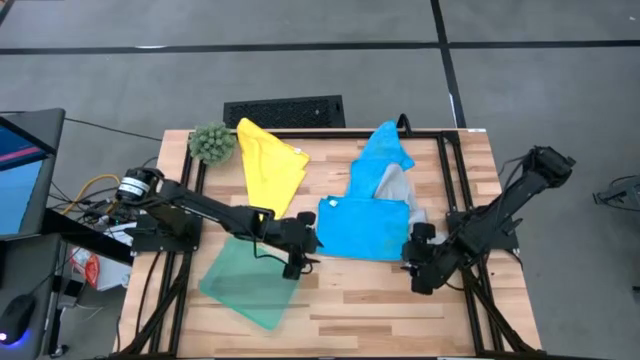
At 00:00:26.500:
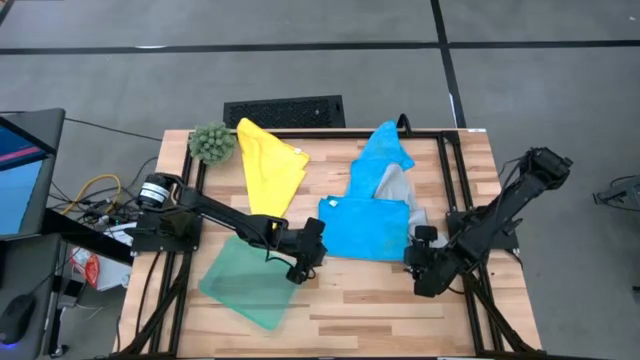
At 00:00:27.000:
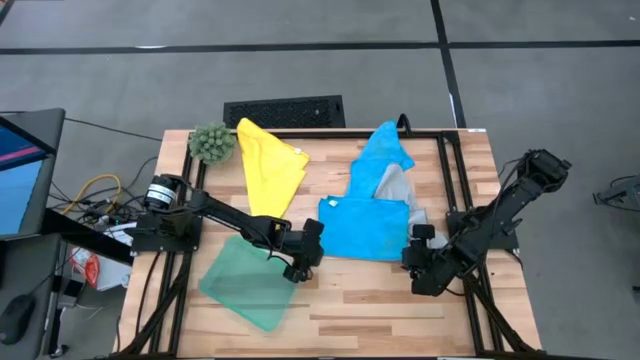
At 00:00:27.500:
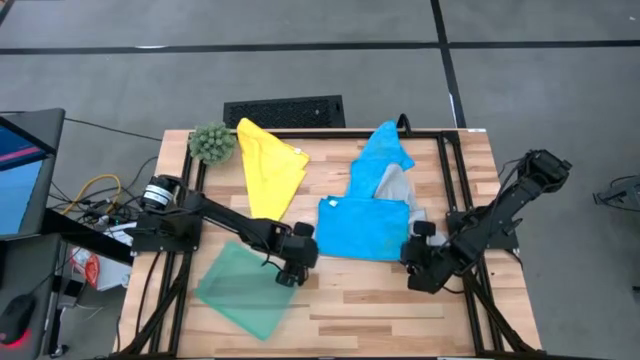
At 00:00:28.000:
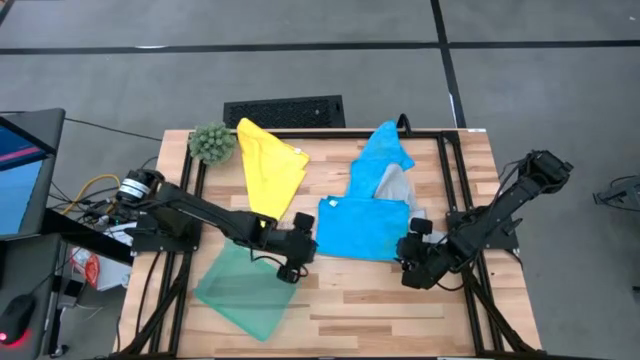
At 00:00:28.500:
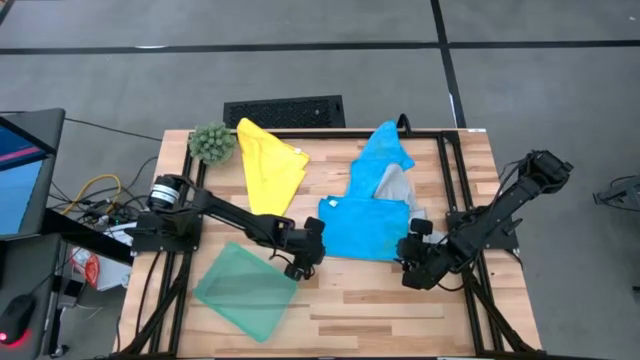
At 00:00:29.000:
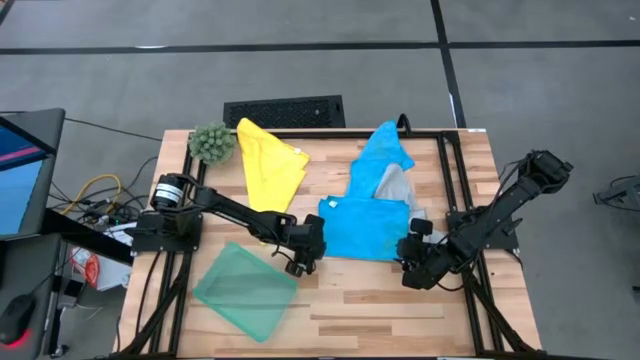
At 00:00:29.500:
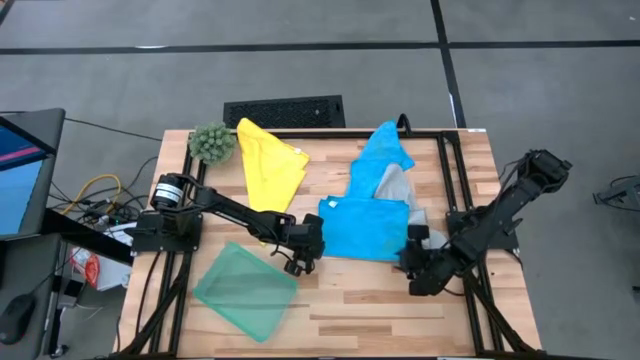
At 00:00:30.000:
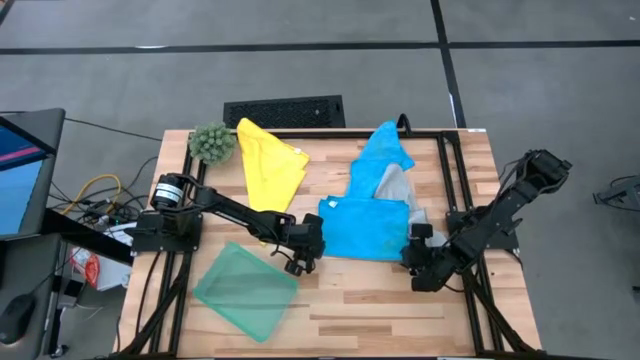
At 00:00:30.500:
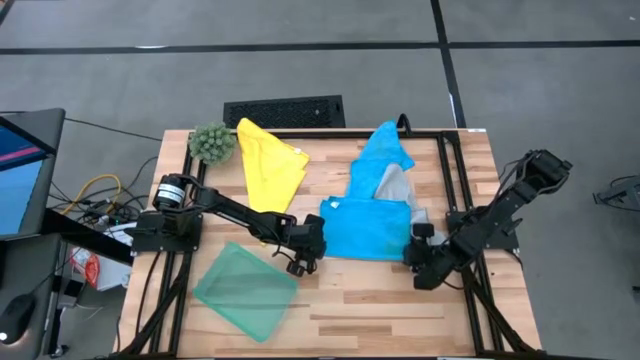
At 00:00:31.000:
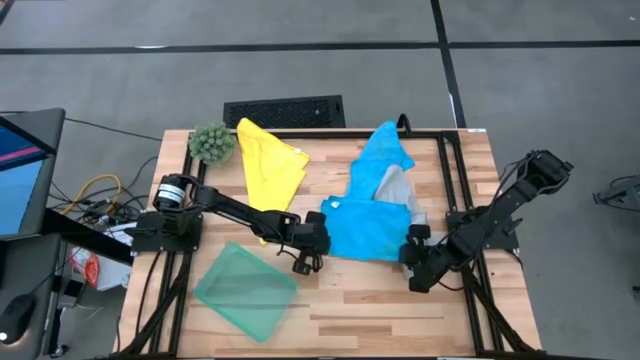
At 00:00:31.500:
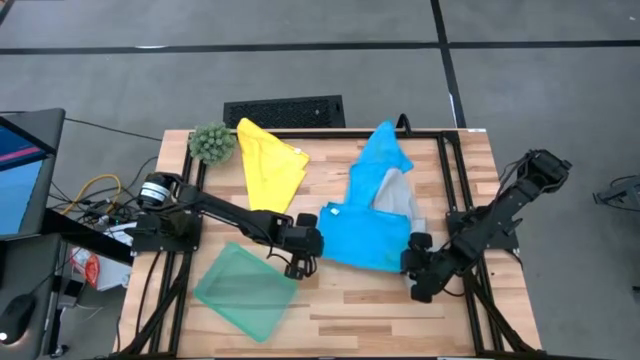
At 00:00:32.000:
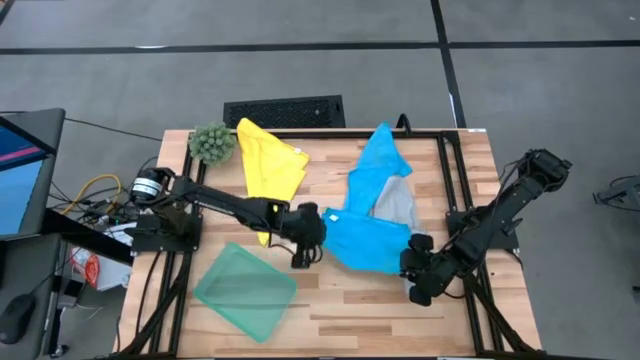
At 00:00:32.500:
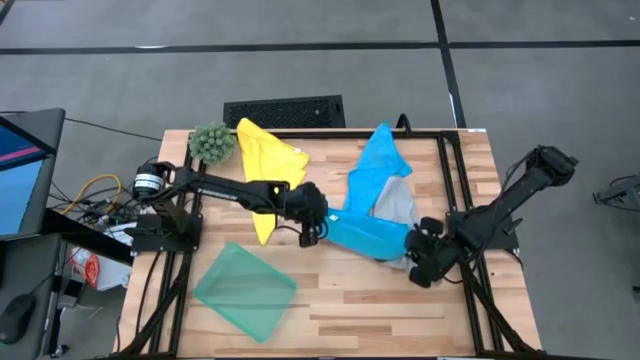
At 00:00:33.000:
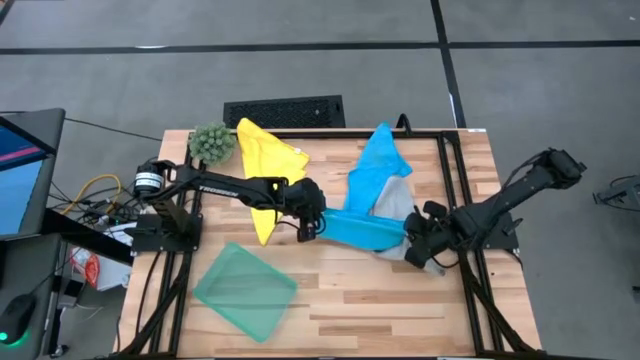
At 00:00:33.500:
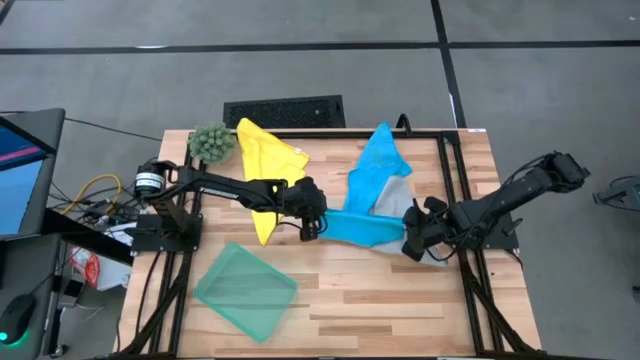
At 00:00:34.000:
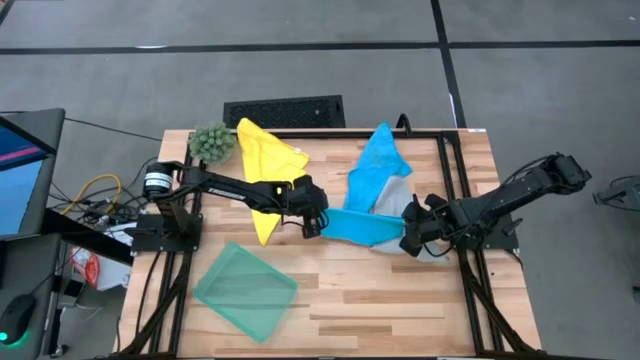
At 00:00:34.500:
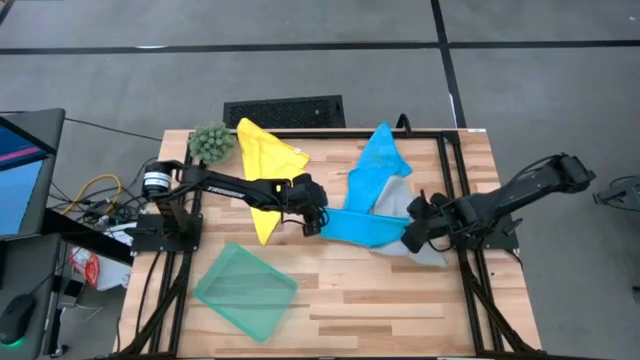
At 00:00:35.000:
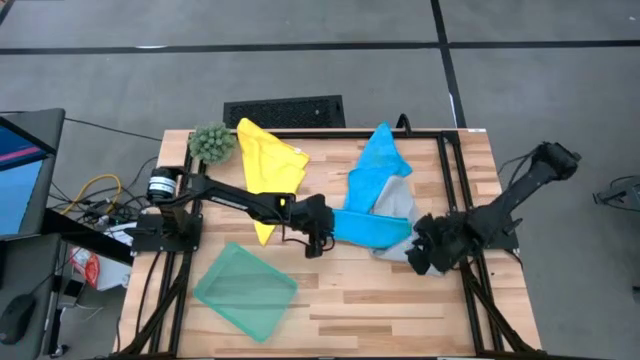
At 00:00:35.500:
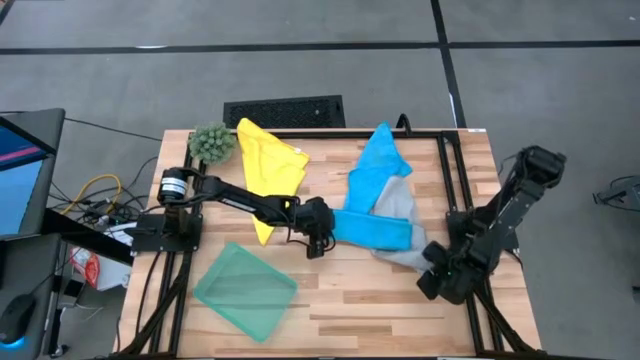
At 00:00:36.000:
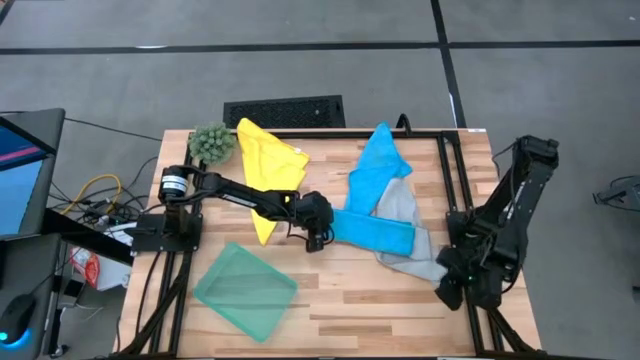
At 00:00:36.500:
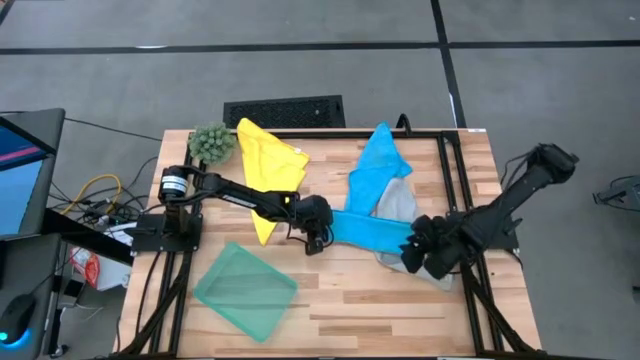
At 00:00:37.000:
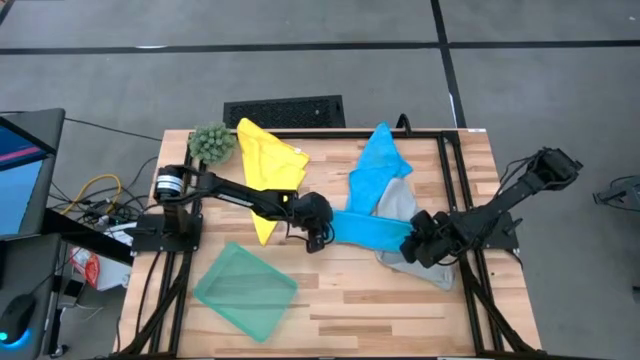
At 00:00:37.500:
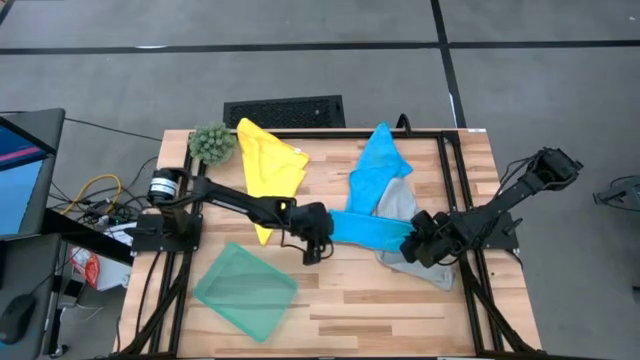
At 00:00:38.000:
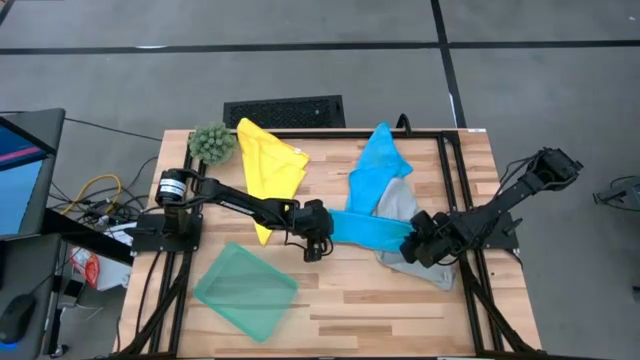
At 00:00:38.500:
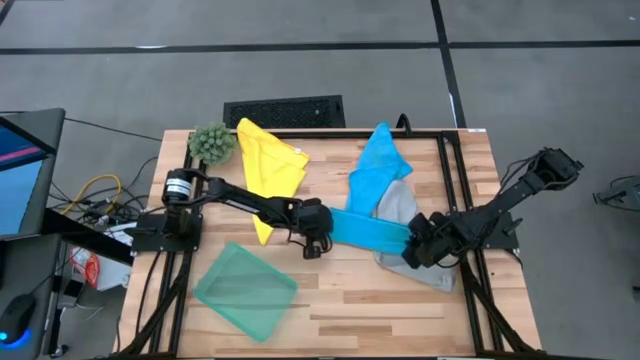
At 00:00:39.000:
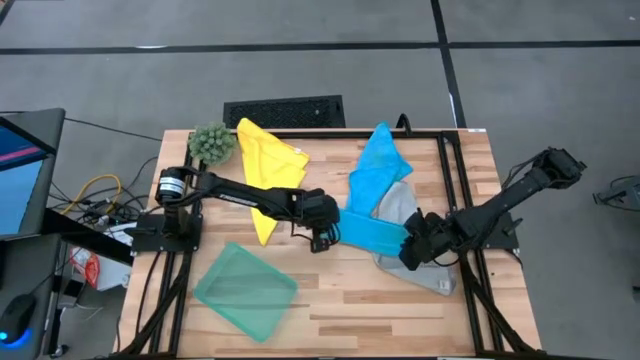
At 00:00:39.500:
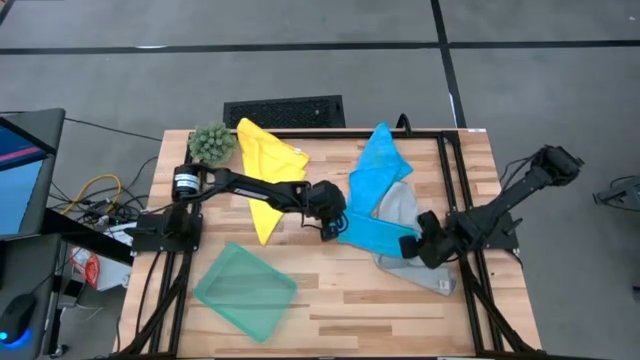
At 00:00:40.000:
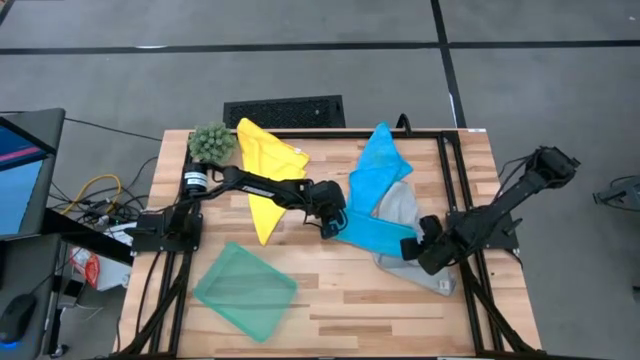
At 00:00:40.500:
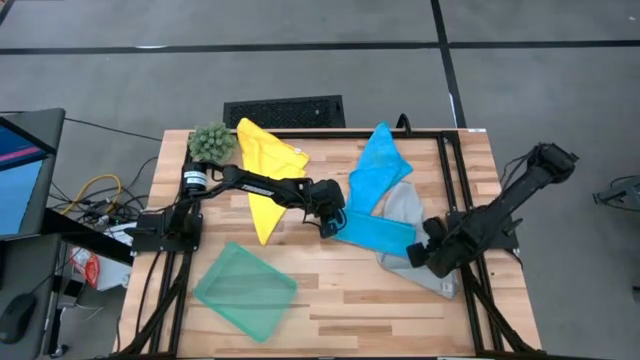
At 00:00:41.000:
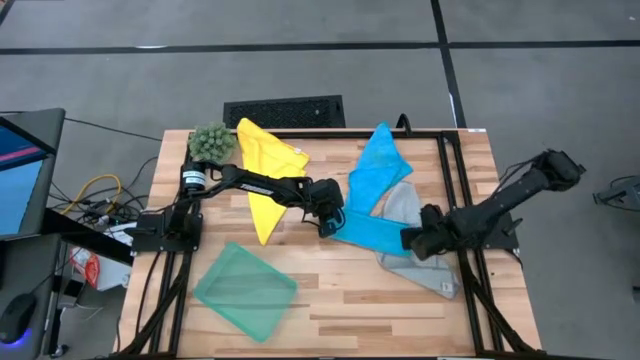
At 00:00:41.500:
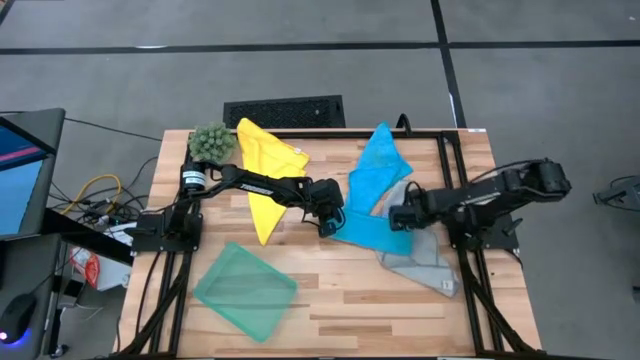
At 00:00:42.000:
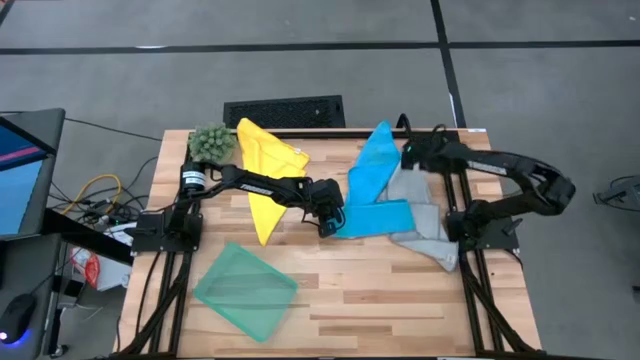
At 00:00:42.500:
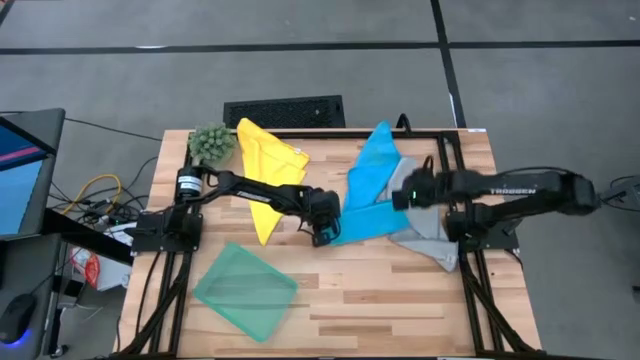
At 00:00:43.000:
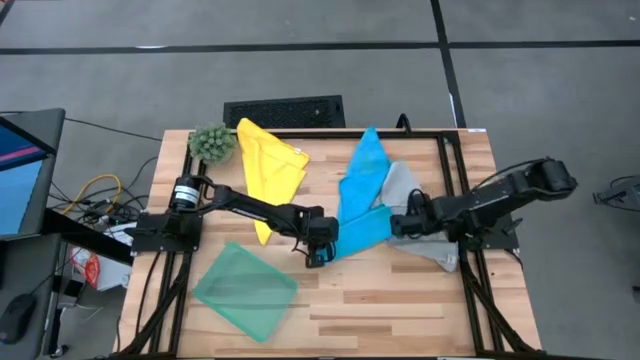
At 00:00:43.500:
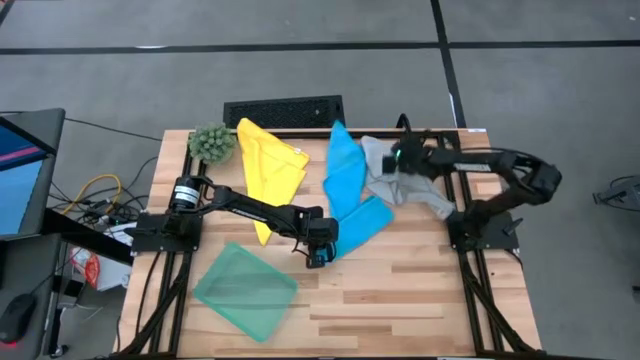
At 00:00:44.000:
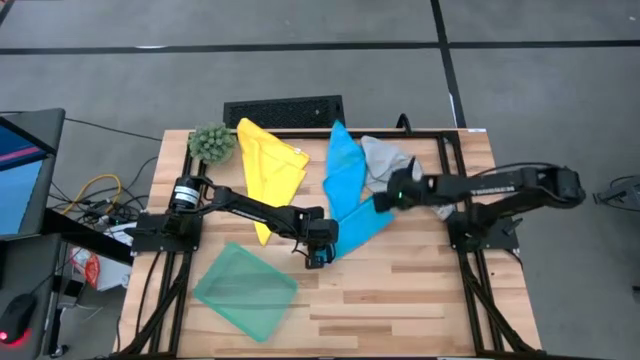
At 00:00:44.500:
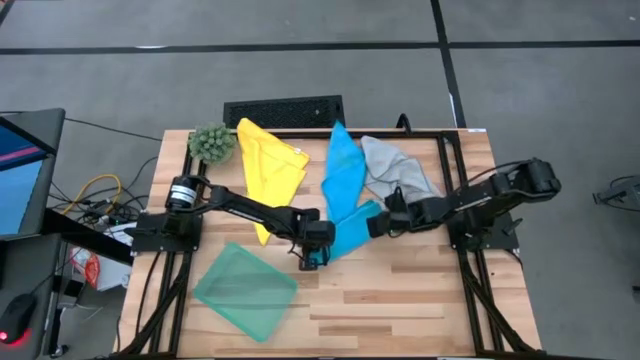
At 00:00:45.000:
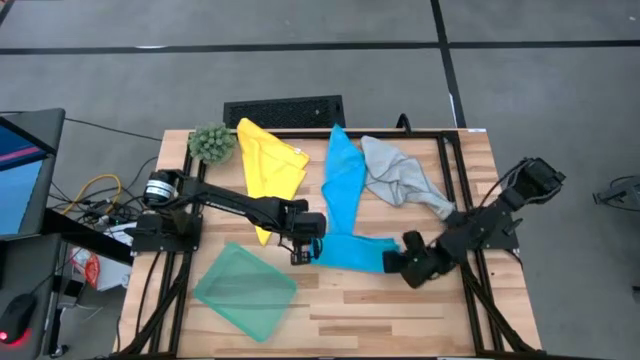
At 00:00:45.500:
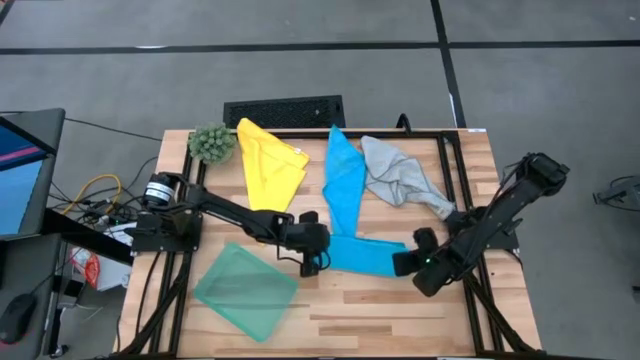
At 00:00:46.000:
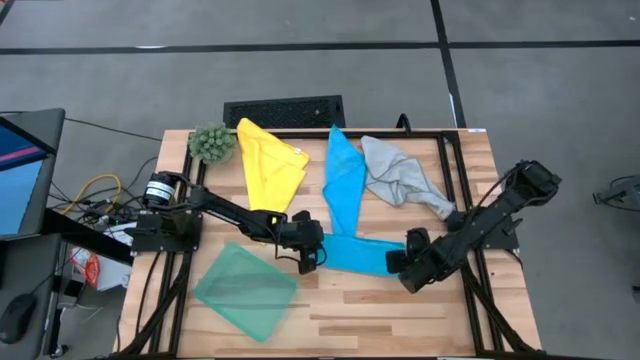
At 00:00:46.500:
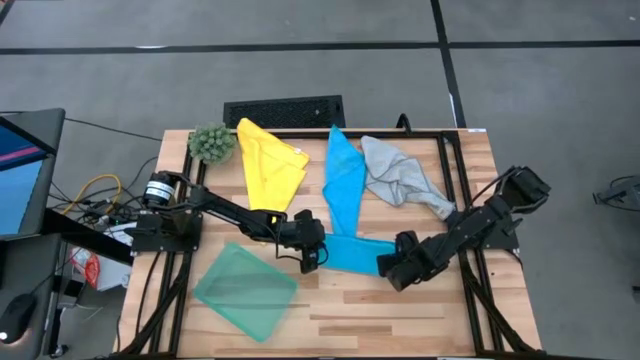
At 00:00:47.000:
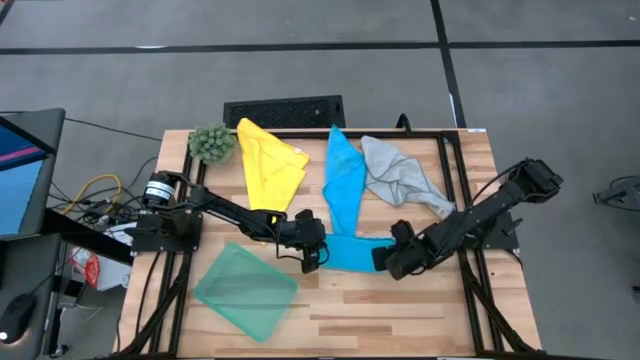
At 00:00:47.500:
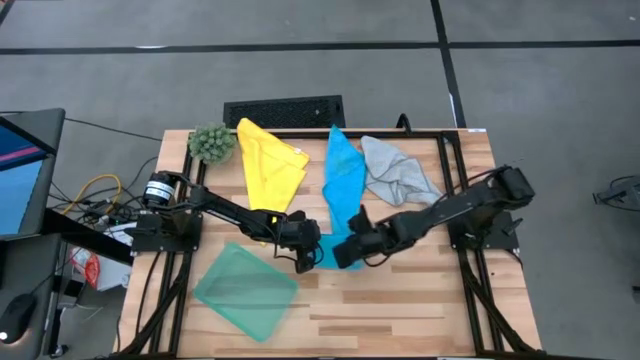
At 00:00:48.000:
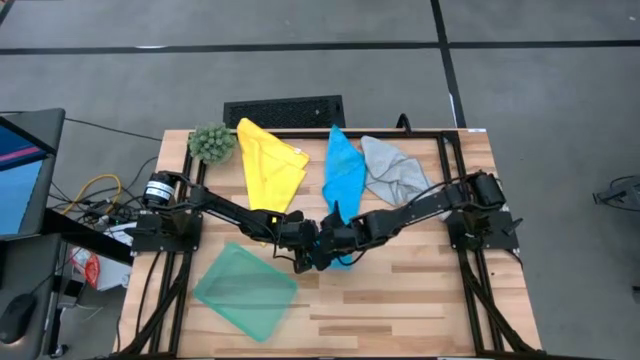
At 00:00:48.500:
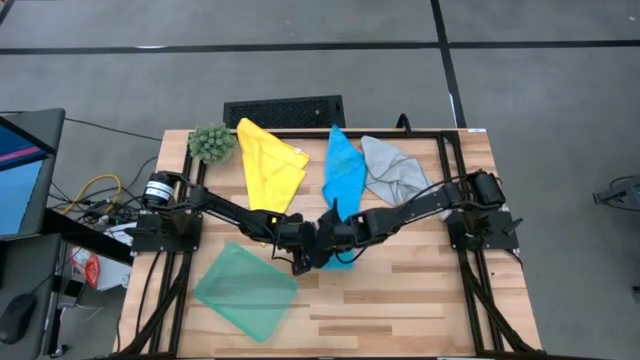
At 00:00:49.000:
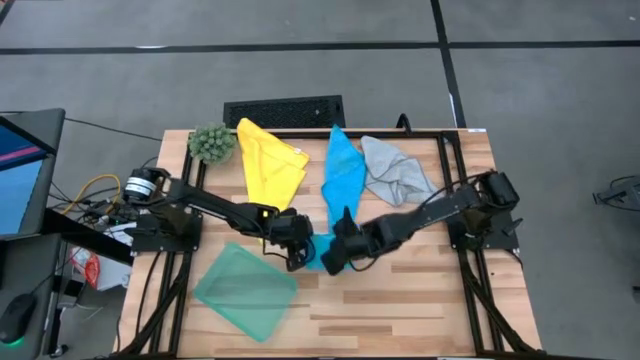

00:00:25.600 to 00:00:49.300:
Task: Fold microfiber towels
Fold the left blue towel
